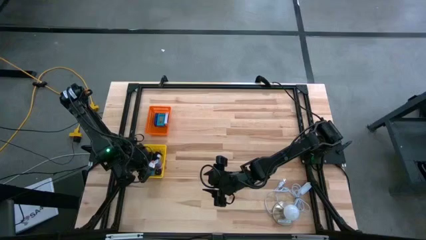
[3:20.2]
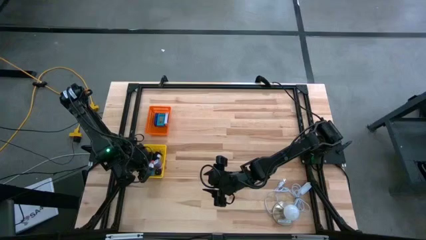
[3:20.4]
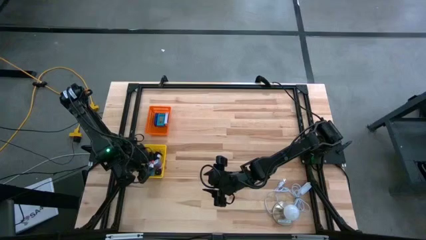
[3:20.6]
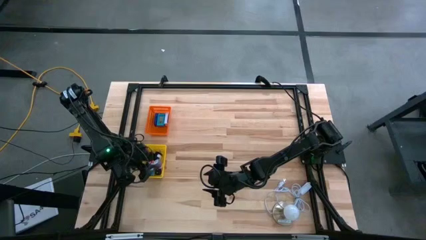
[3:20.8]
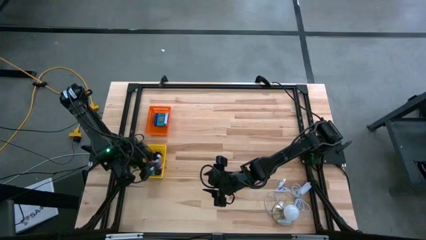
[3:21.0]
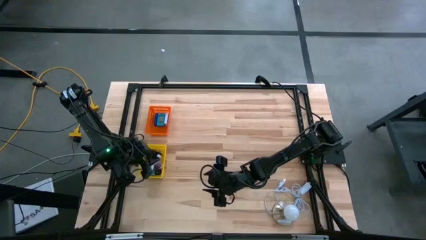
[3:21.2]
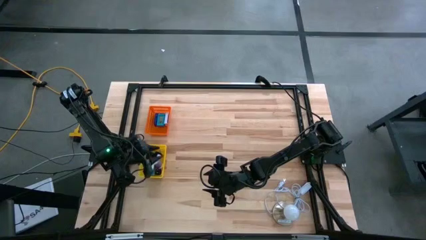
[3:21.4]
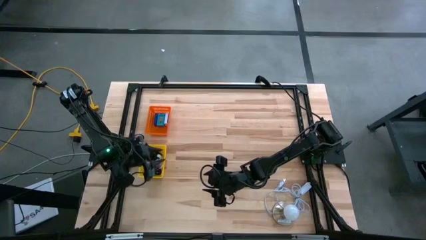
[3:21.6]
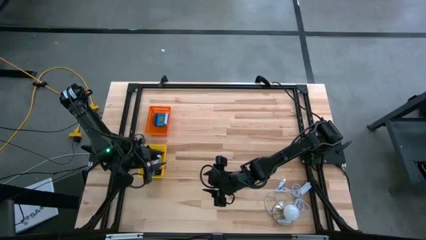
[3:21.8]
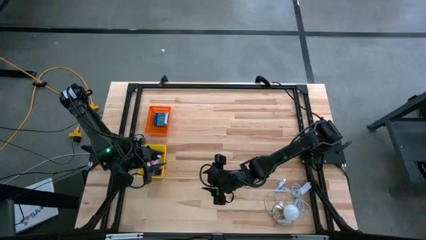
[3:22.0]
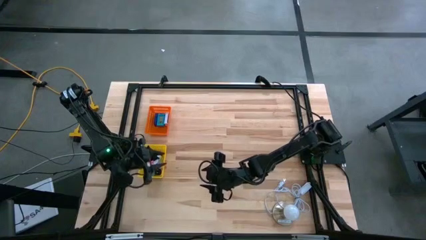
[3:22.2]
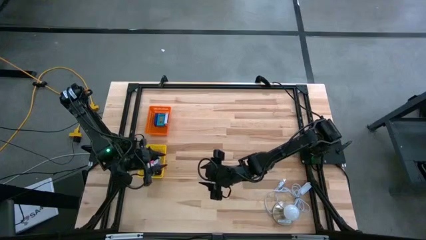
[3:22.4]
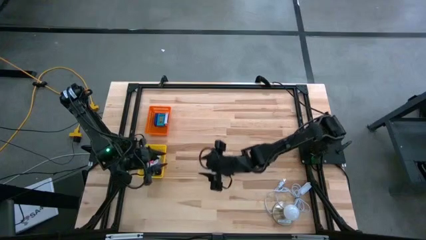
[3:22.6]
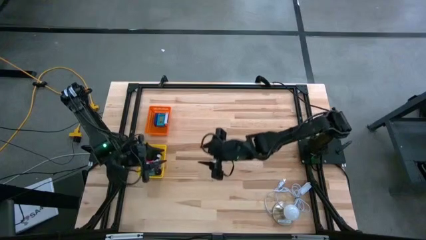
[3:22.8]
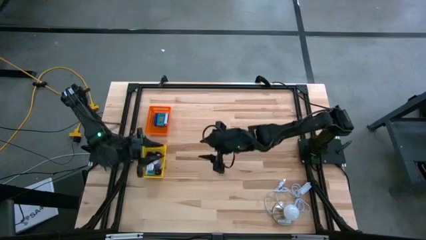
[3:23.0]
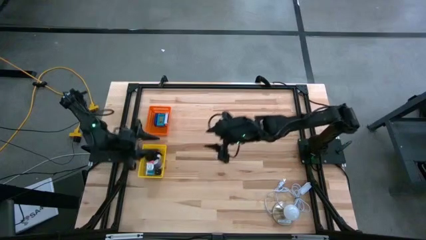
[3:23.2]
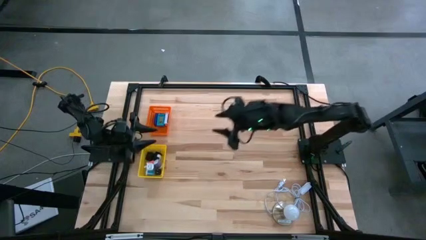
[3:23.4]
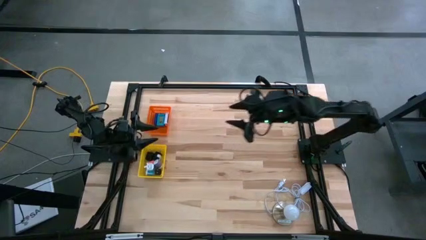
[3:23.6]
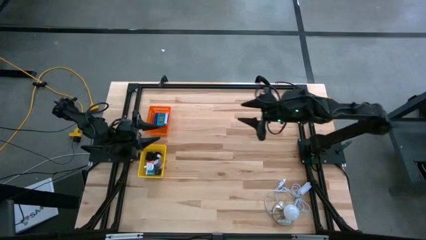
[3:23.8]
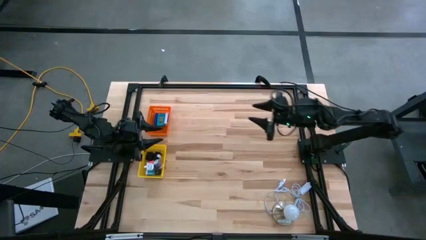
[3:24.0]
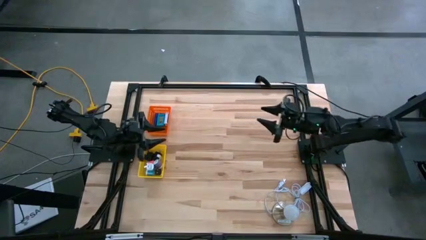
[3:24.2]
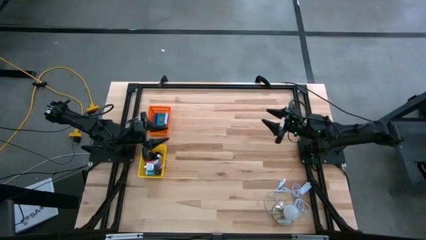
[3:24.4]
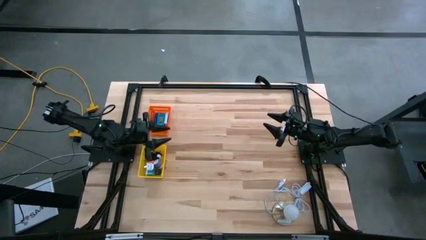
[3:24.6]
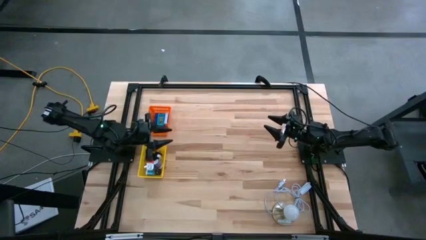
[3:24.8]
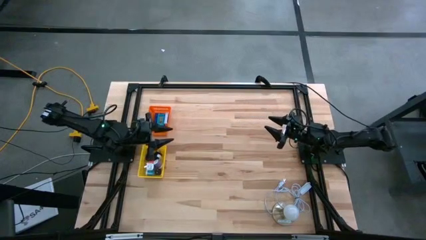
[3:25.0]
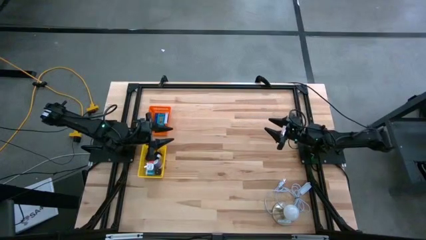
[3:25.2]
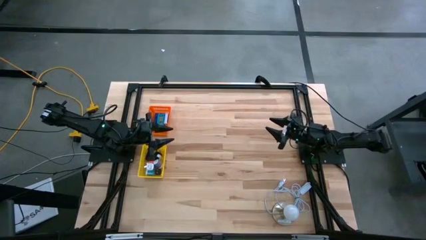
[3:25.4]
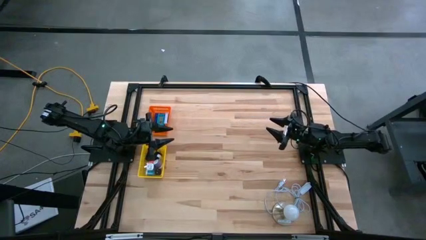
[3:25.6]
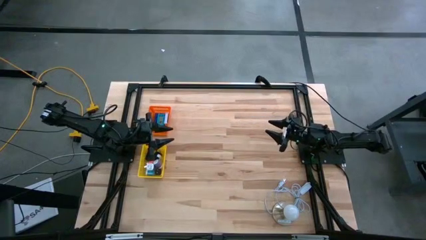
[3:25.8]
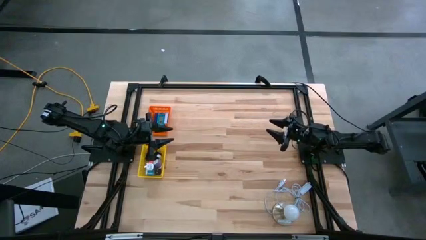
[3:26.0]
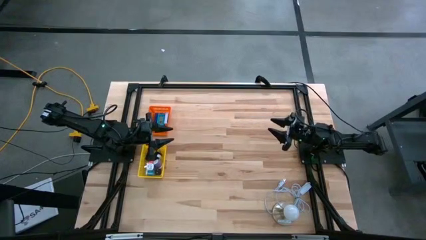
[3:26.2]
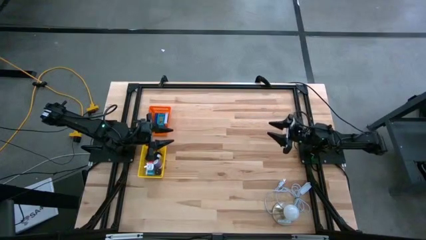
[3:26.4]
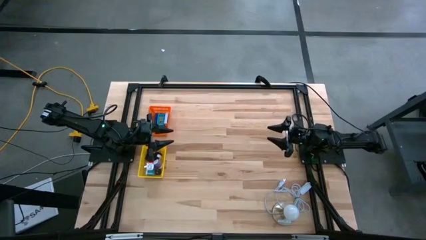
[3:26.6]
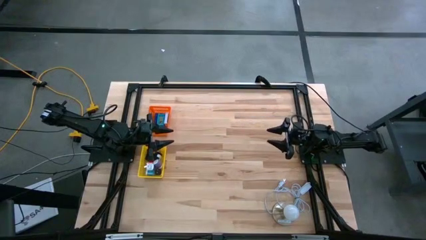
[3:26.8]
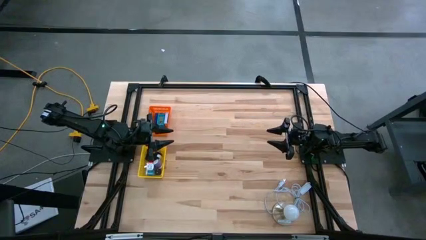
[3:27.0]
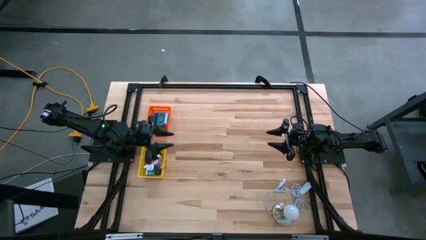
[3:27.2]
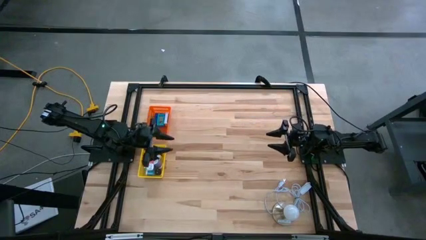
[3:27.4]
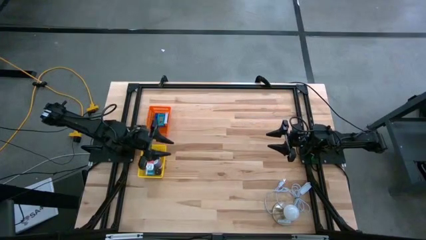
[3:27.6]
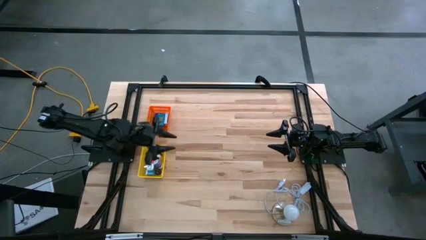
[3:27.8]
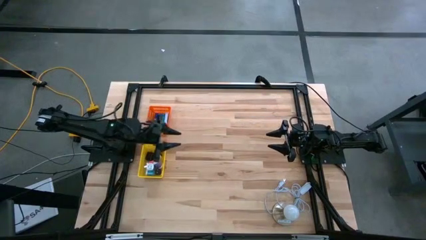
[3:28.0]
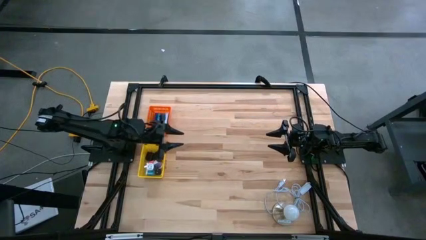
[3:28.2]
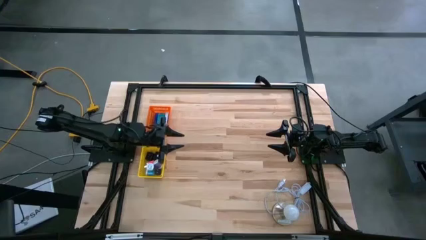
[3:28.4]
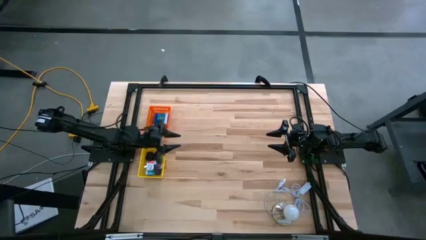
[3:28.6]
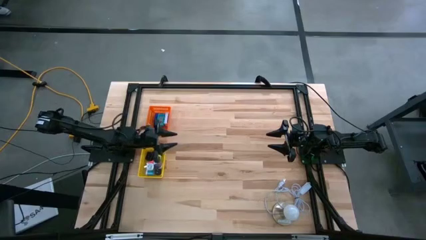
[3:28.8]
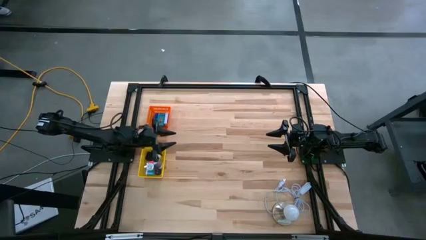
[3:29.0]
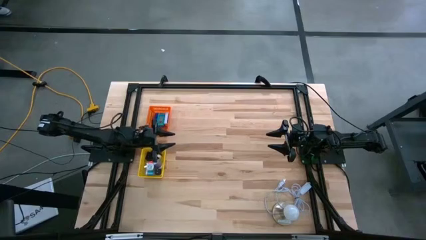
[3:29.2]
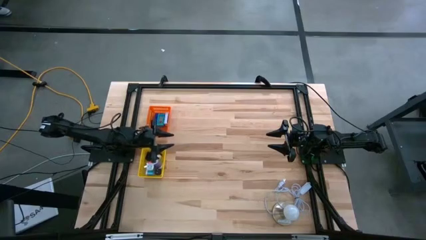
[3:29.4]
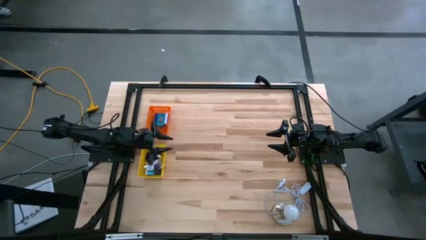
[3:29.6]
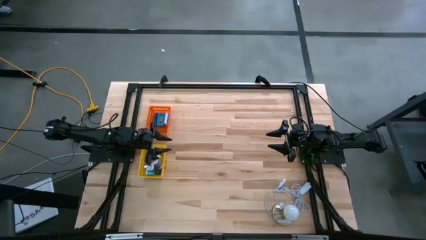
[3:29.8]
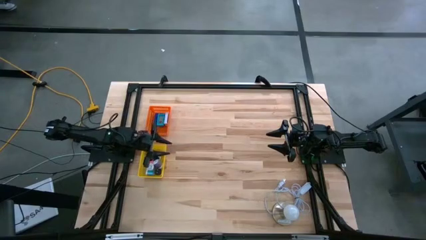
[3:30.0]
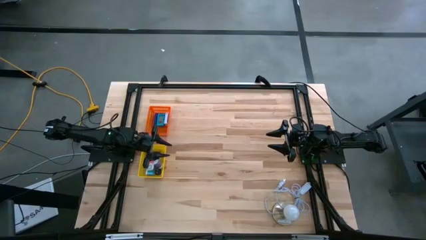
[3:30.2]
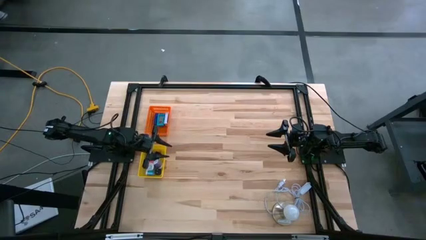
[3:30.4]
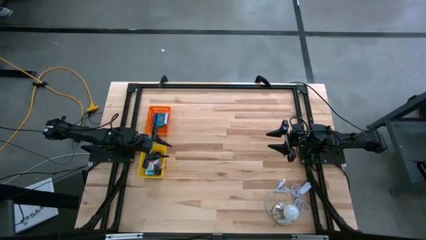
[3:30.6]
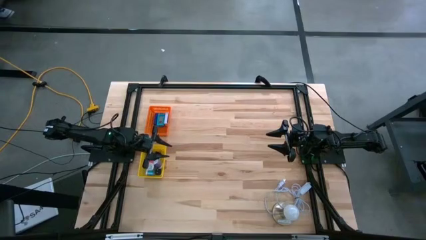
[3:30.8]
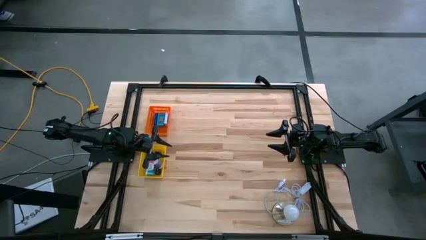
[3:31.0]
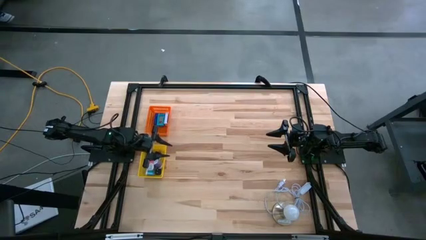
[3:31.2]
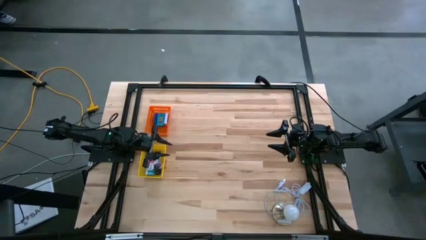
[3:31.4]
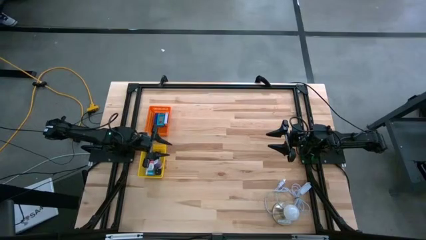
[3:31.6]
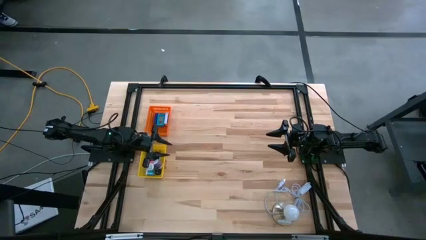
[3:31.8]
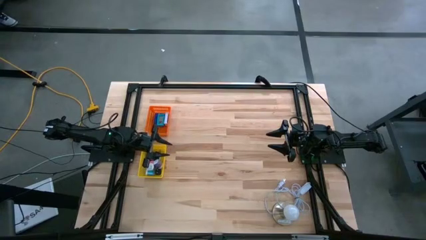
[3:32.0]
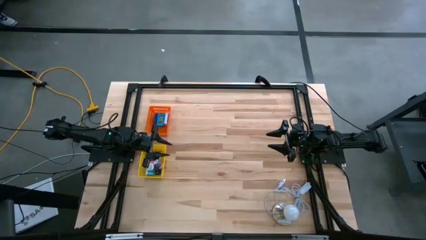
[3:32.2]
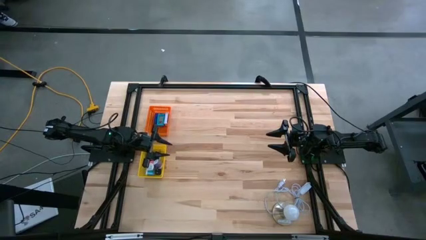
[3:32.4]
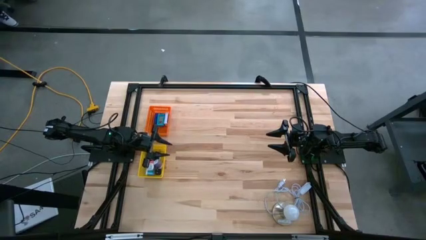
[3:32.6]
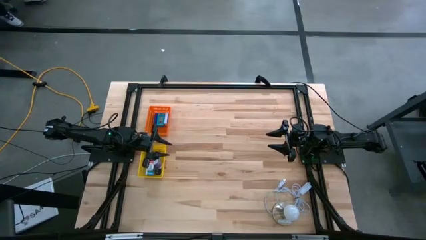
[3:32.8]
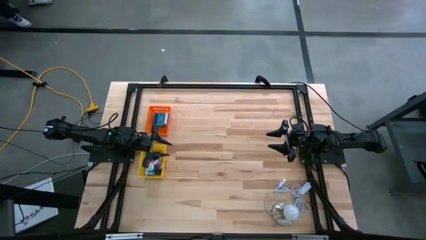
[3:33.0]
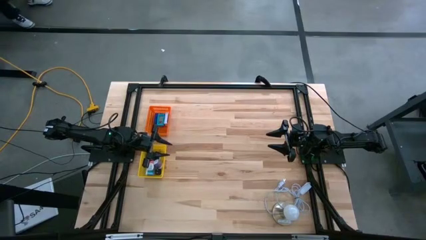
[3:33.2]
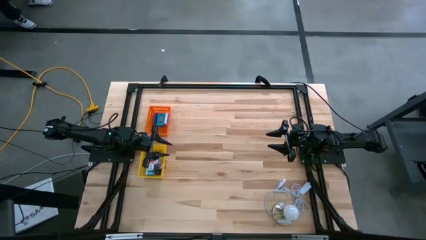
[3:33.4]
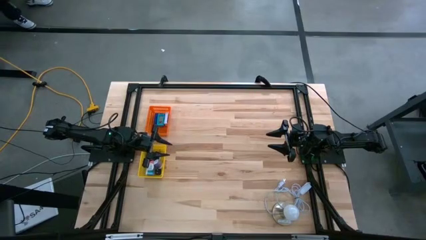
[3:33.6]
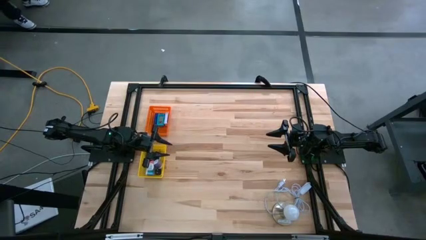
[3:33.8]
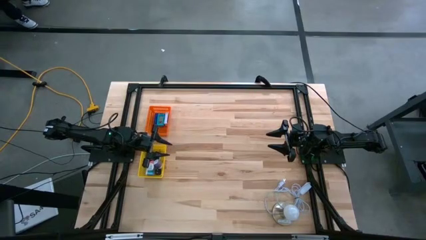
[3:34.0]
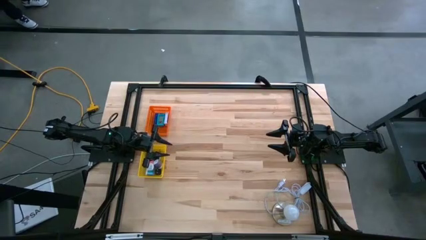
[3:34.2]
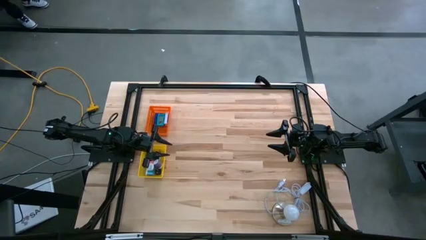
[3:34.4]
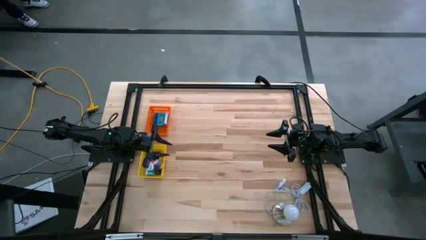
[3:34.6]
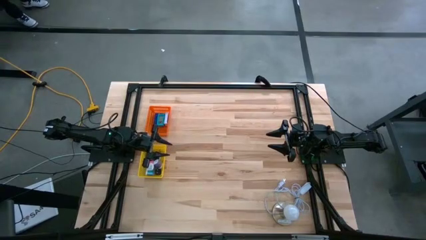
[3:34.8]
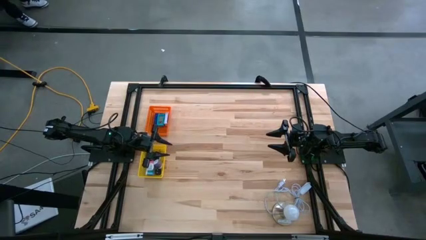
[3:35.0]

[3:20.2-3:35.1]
Task: Pick & Place Office items
Return to Home Position

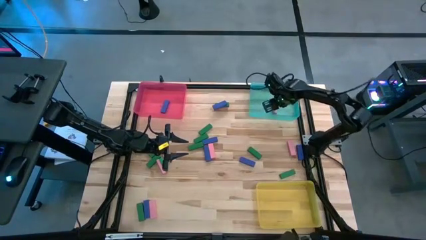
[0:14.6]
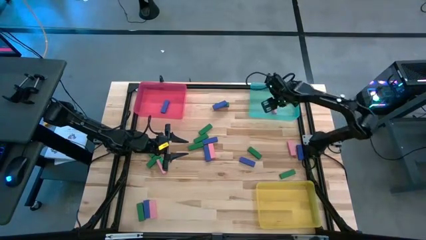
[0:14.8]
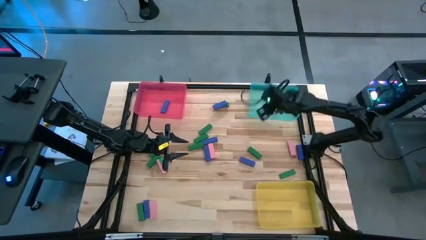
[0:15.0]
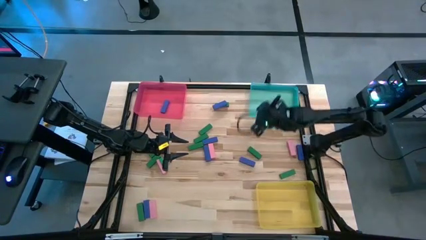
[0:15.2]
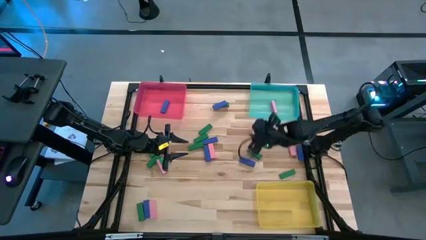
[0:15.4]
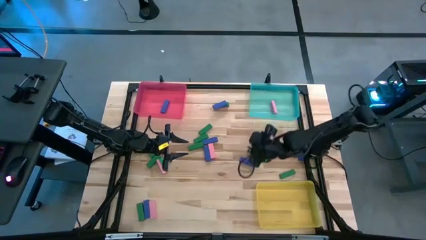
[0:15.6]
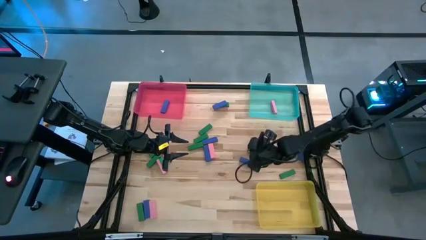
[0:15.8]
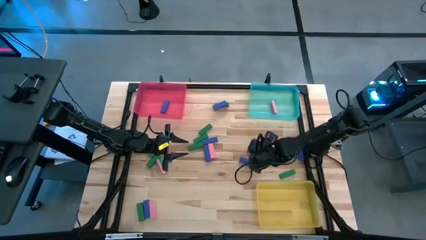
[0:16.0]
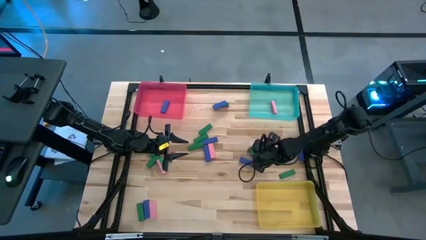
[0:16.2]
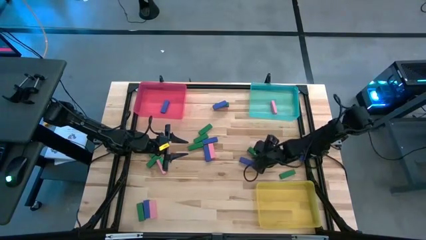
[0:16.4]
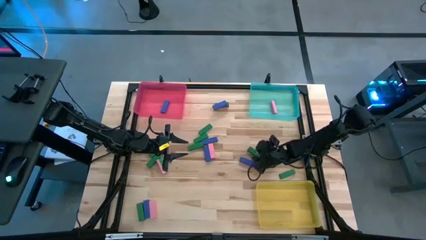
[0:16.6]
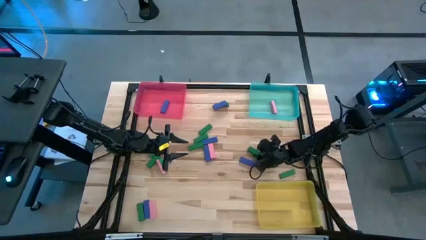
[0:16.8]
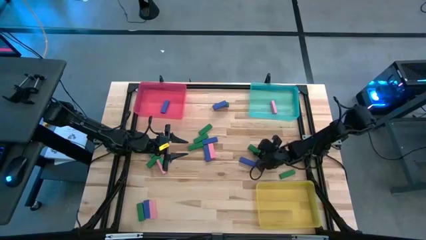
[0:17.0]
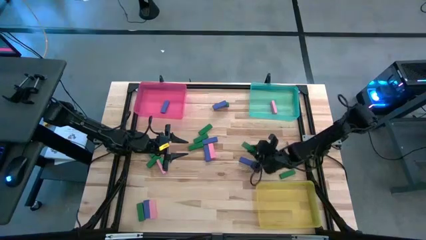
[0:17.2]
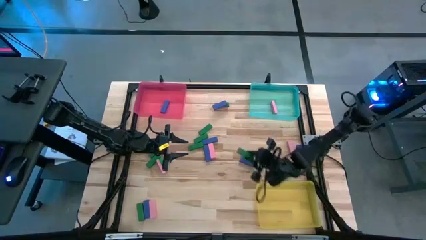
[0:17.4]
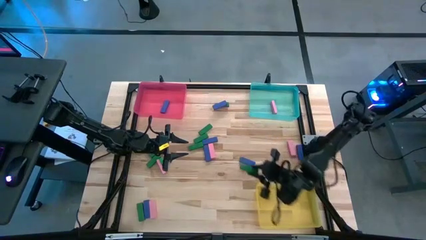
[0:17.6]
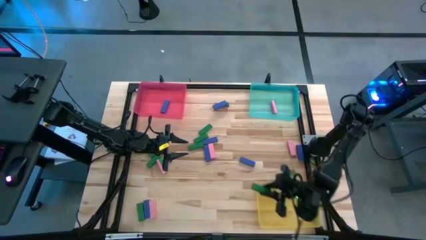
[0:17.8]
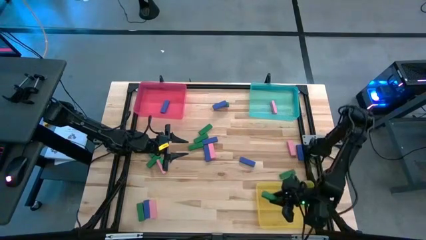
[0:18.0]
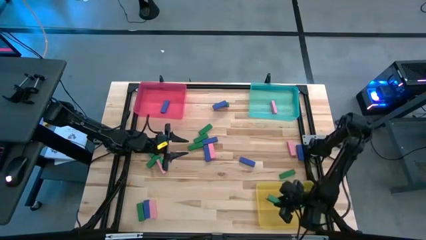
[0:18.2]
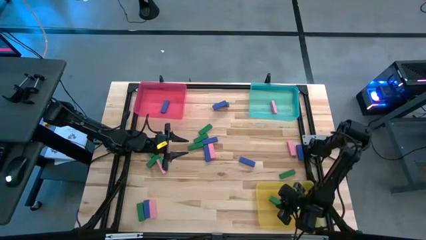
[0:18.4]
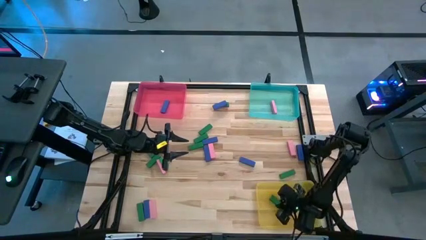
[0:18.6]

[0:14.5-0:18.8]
Task: Sort blocks
Put the green block into the yellow bin
